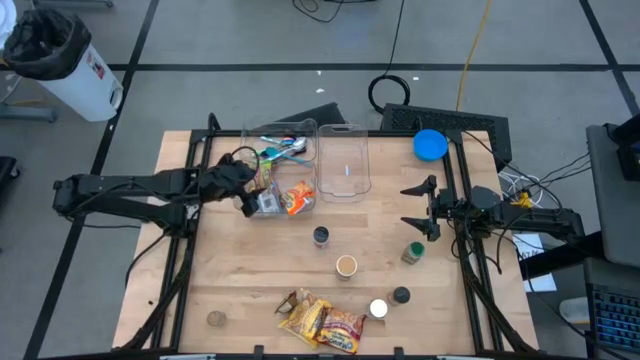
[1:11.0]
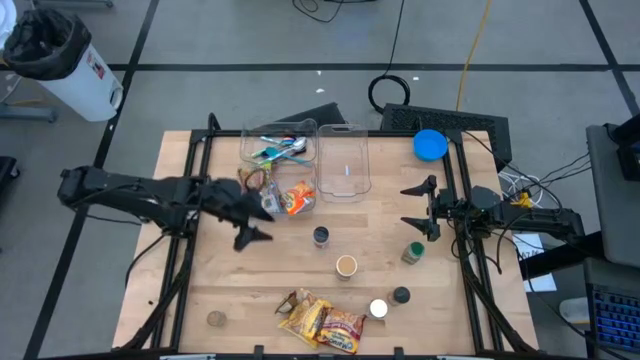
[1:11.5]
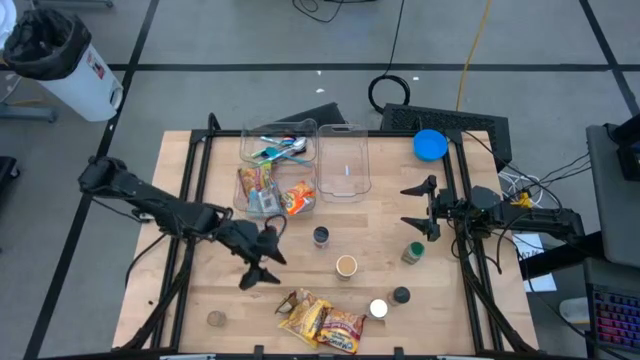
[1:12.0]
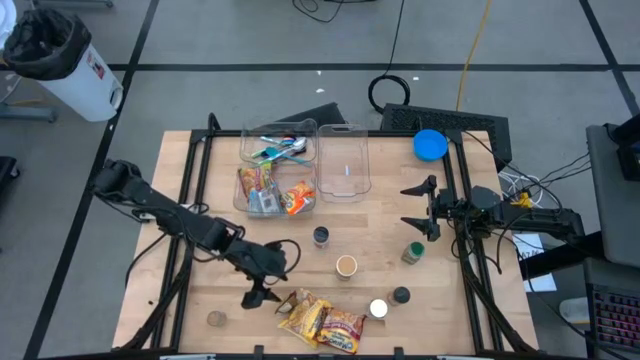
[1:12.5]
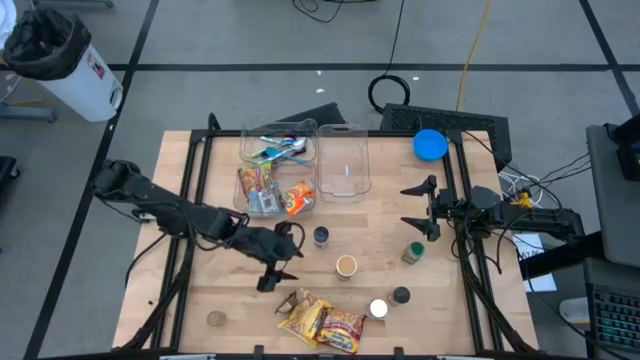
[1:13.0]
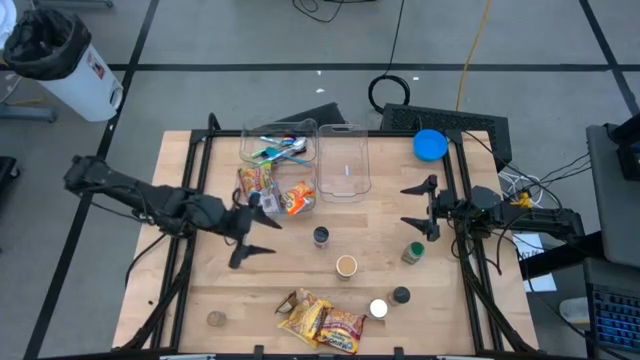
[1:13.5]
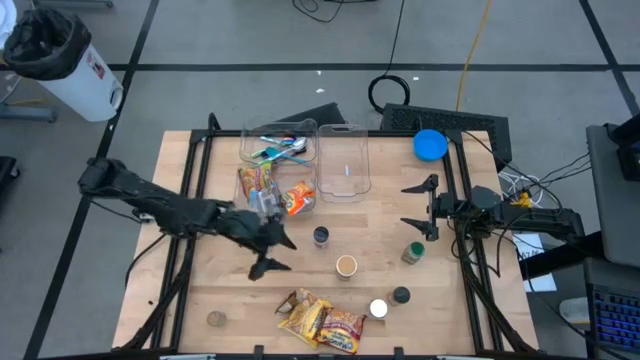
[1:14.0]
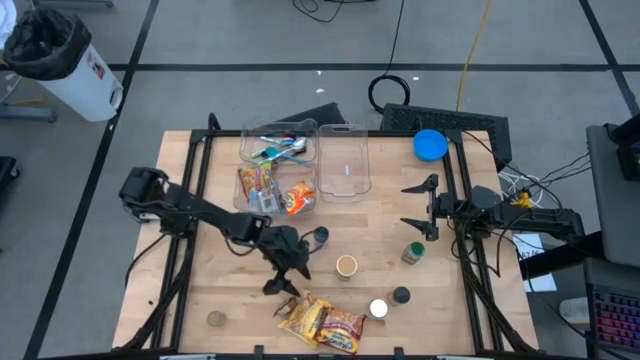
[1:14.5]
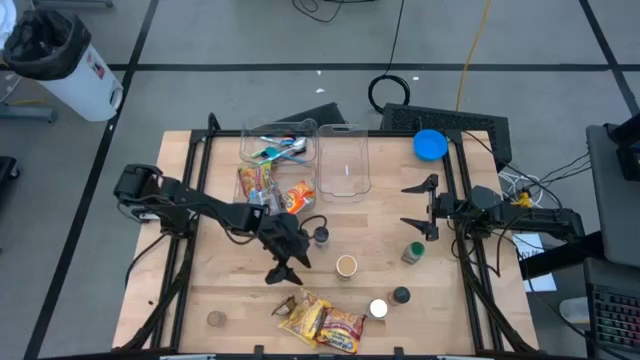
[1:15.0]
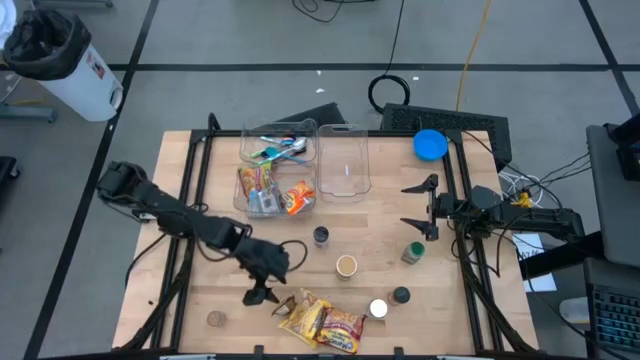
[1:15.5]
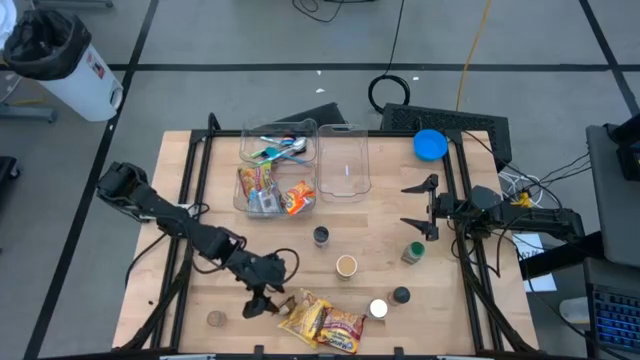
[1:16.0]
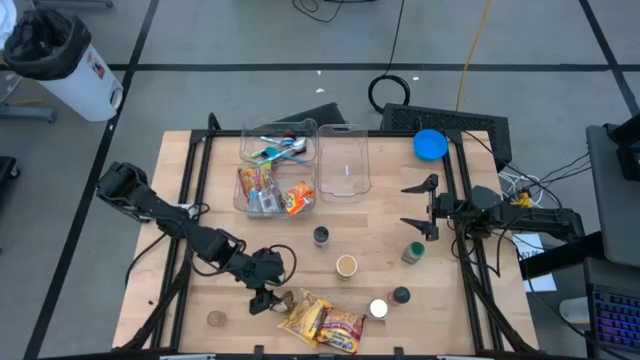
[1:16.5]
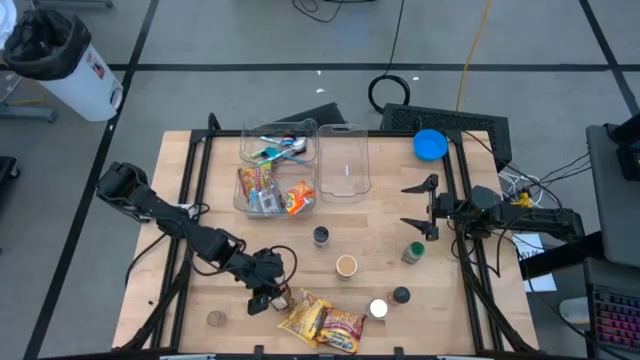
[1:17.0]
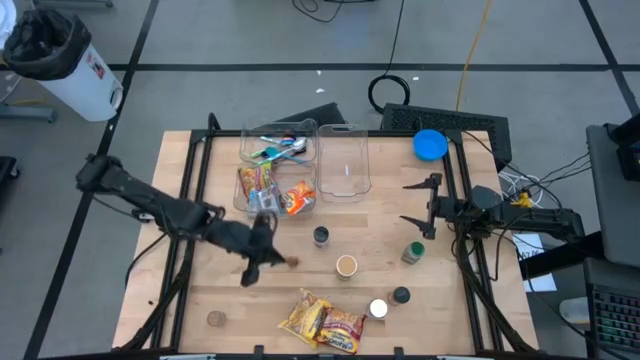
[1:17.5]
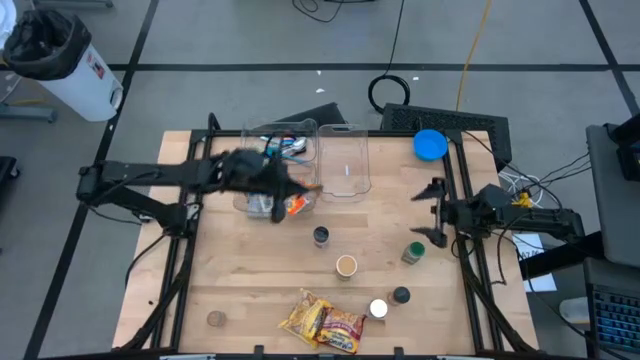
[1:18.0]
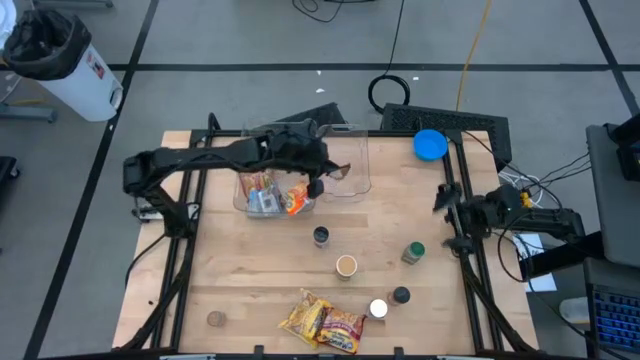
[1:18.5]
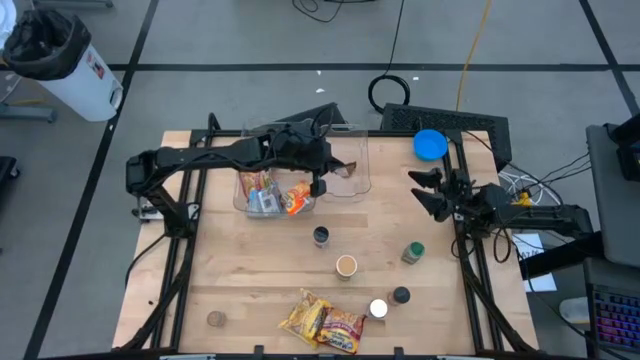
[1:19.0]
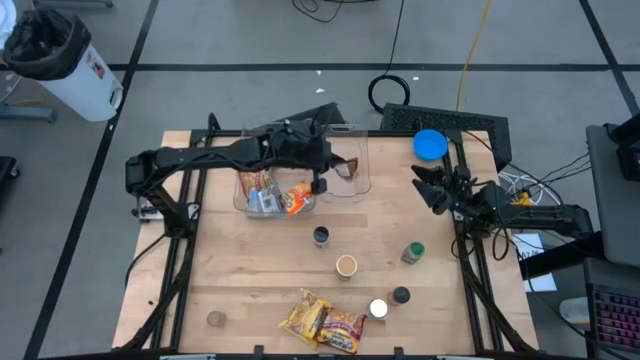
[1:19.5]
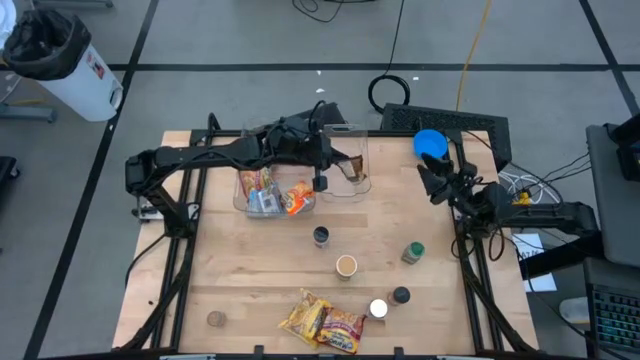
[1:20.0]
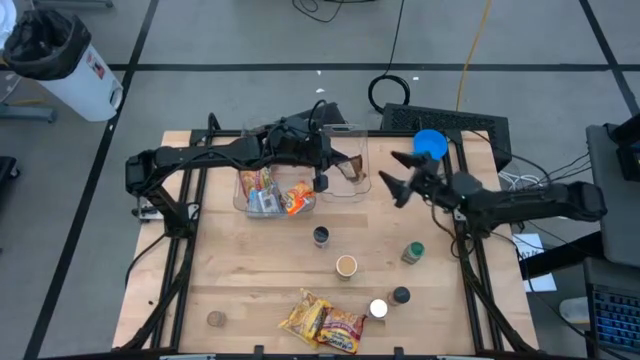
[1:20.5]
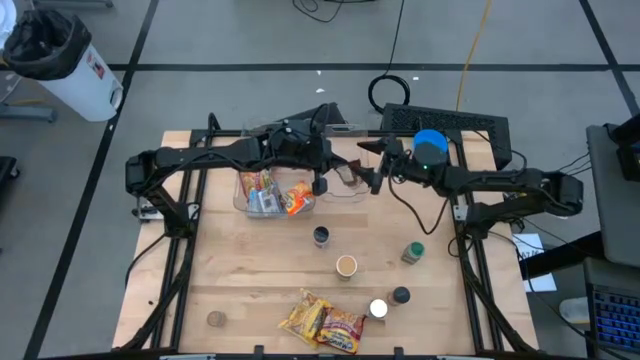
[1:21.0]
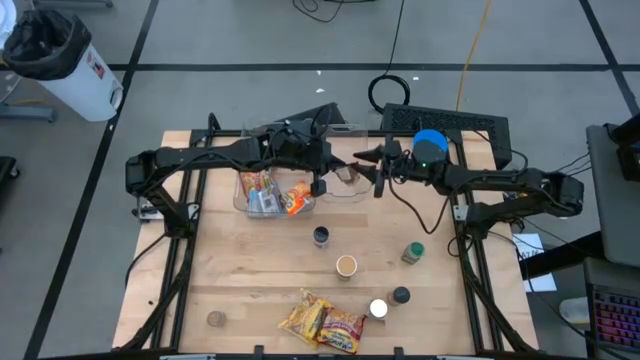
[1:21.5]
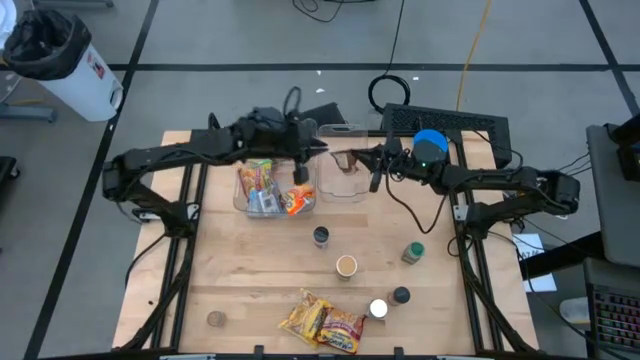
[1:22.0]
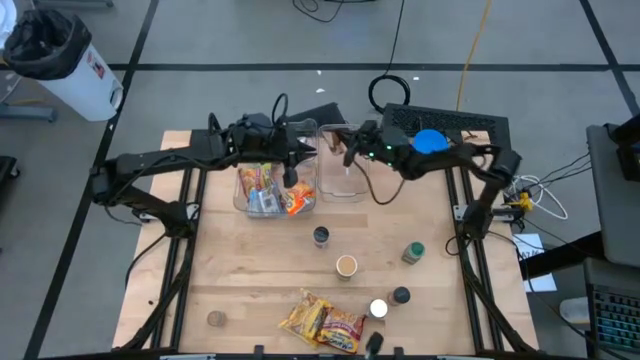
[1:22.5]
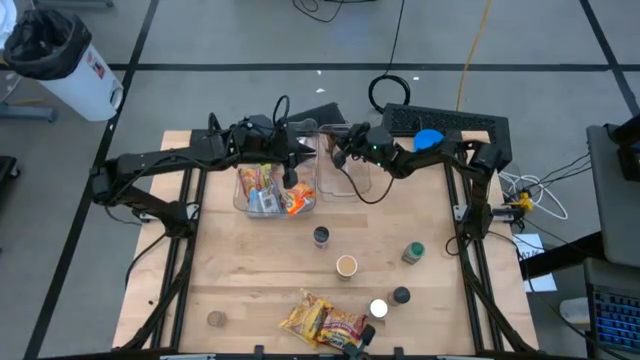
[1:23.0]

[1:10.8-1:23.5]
Task: Pick & Place Food Item
Put the orange seasoning pack into the right transparent bin

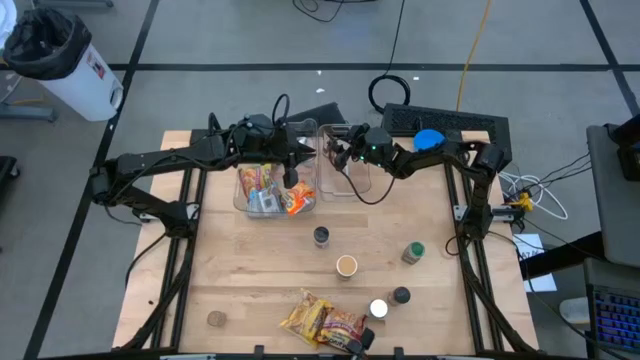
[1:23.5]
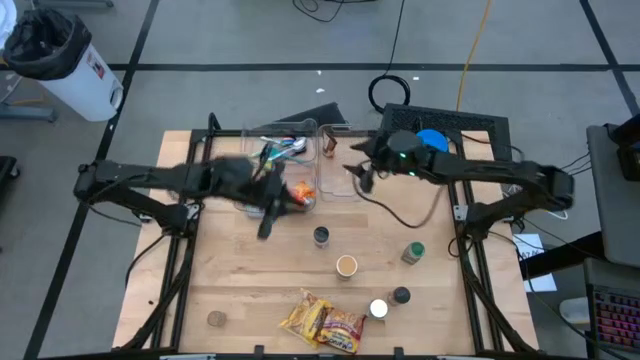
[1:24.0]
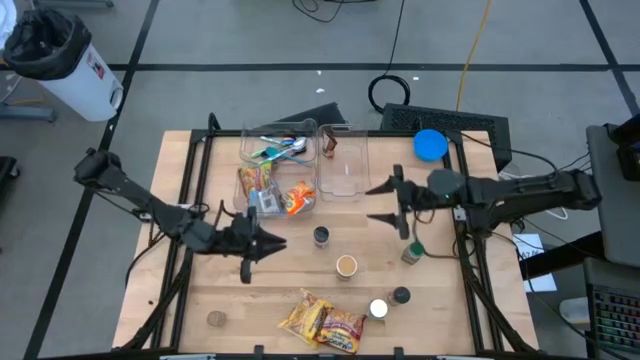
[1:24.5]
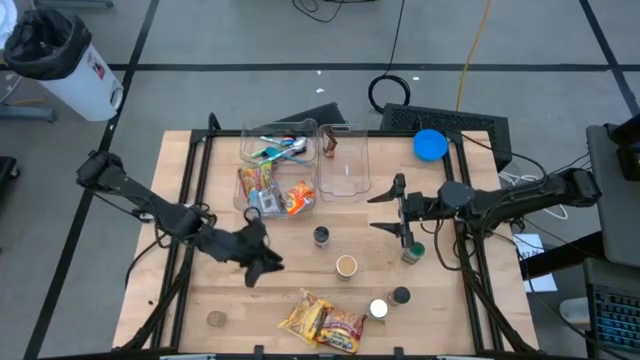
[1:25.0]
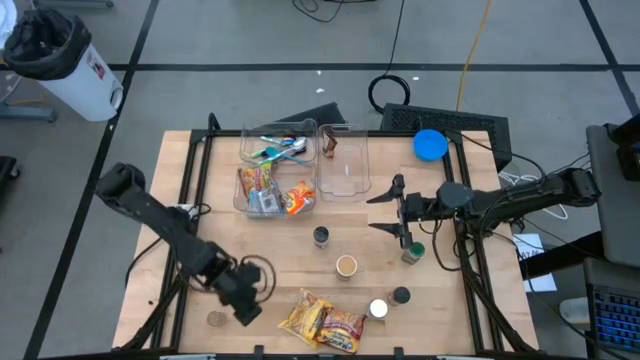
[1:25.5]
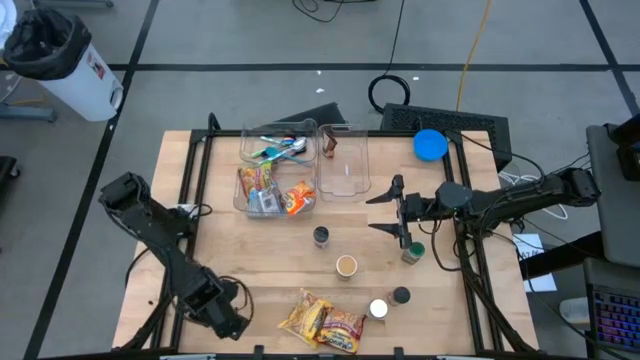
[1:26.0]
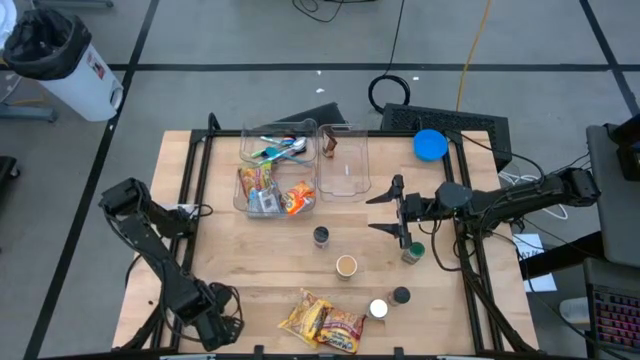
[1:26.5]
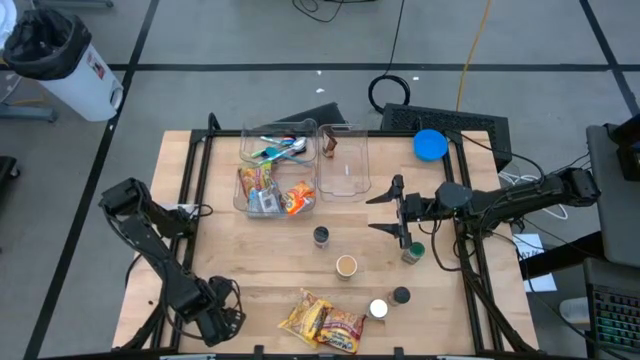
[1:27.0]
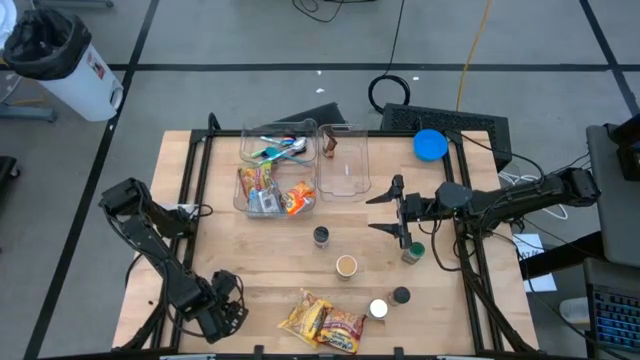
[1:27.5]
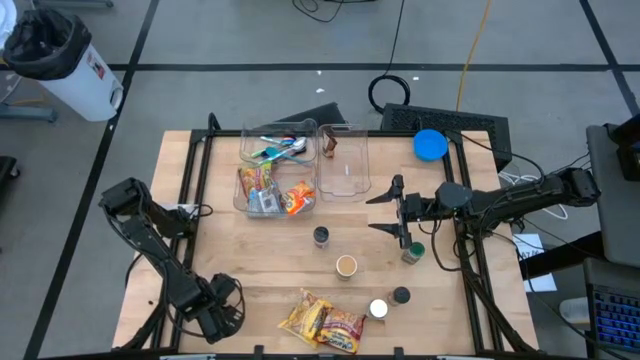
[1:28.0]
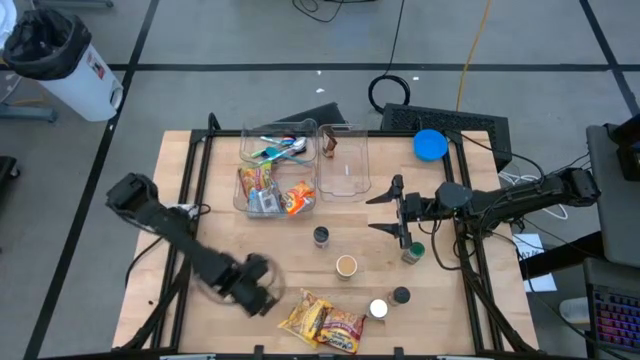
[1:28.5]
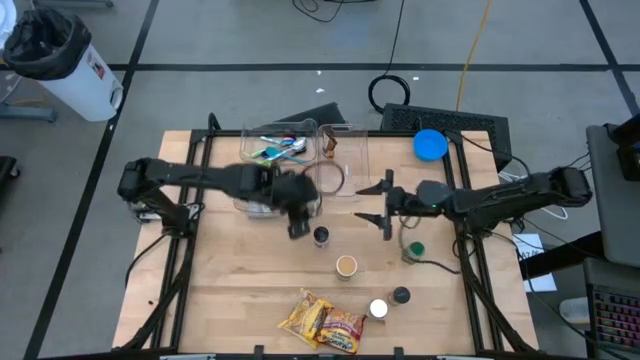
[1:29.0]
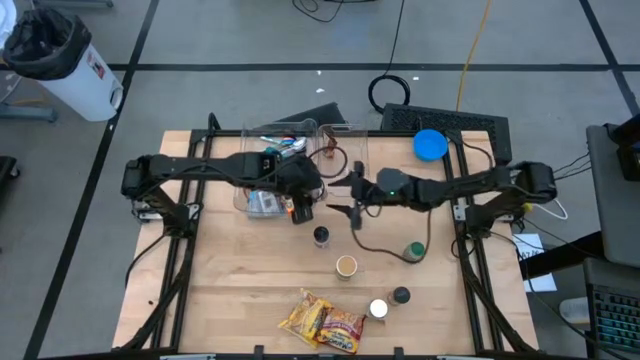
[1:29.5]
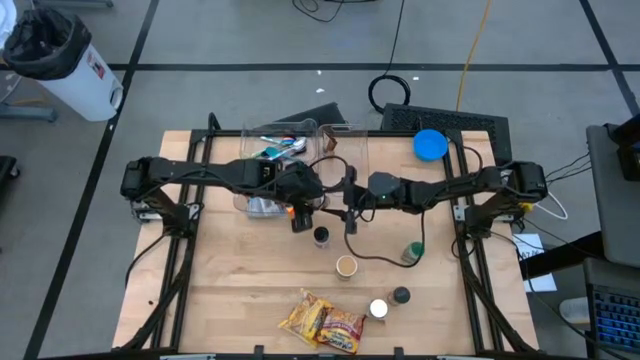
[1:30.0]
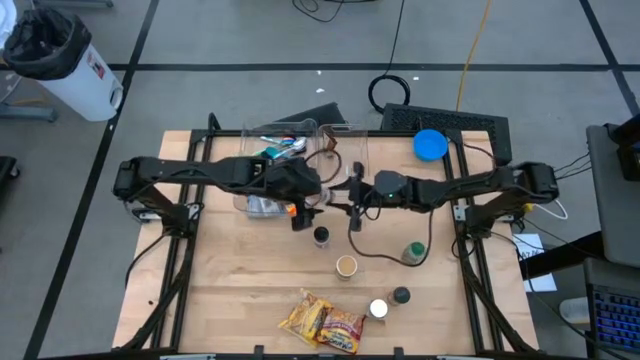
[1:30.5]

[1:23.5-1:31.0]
Put the transparent seasoning bottle into the right transparent bin

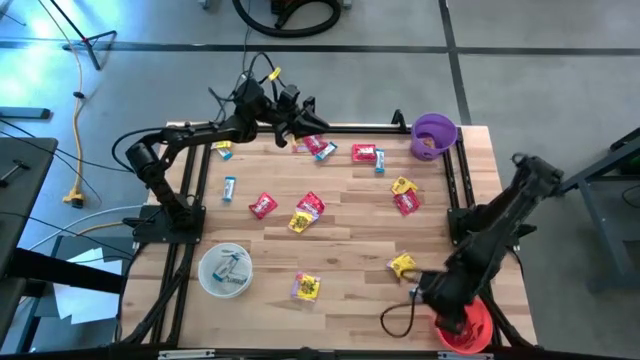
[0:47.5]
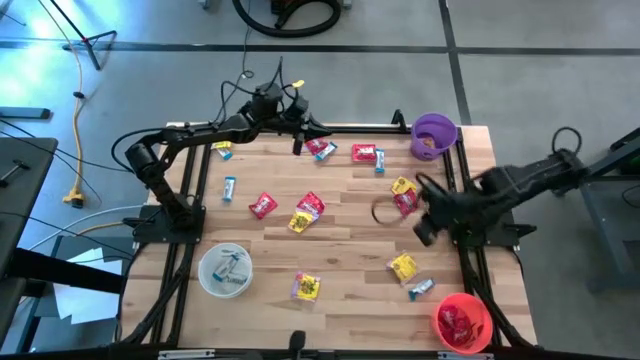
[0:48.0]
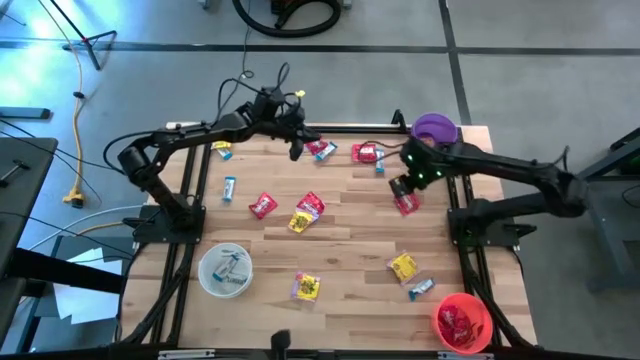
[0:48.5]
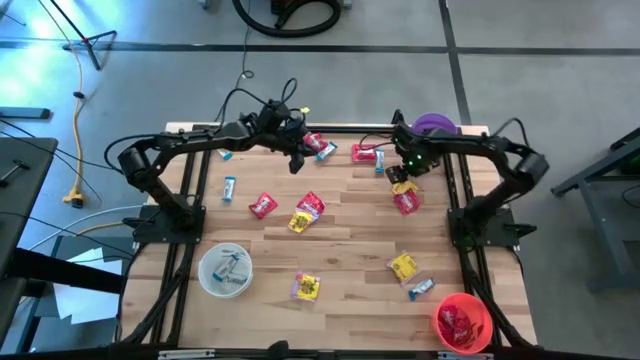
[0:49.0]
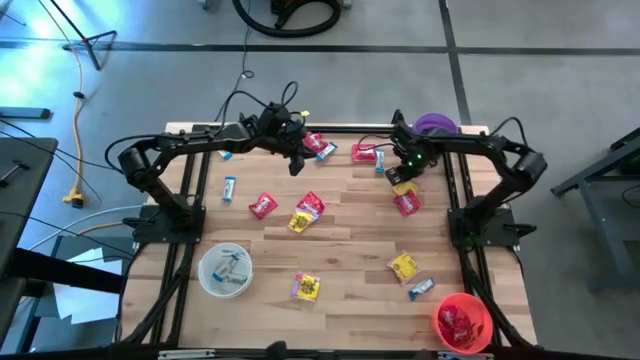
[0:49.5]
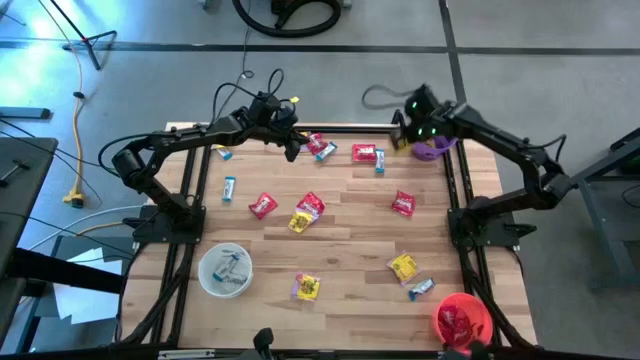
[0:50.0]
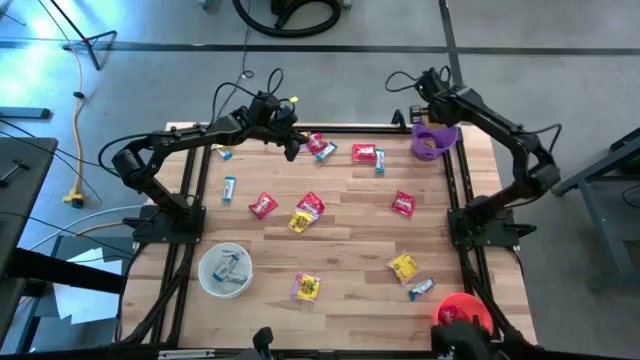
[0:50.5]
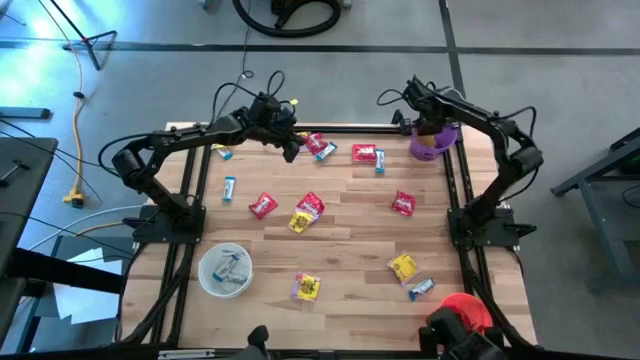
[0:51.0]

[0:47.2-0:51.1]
Task: Sort candy
Put the yellow candy into the purple bin
